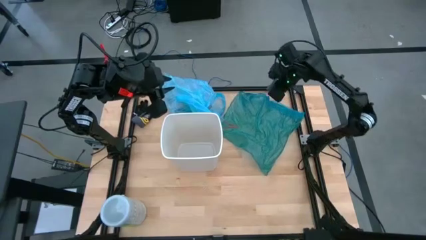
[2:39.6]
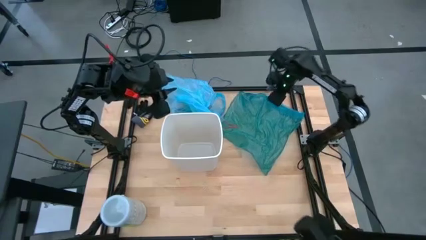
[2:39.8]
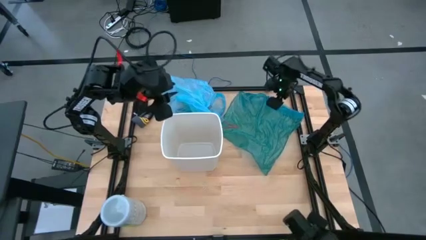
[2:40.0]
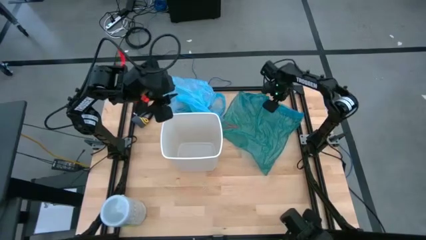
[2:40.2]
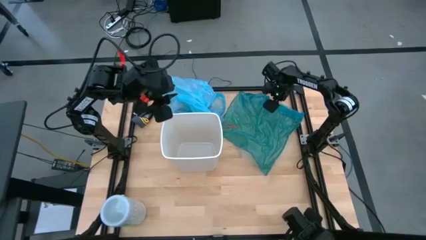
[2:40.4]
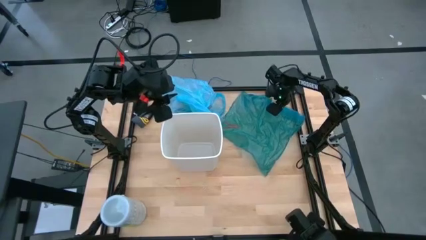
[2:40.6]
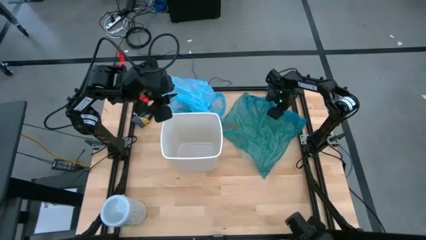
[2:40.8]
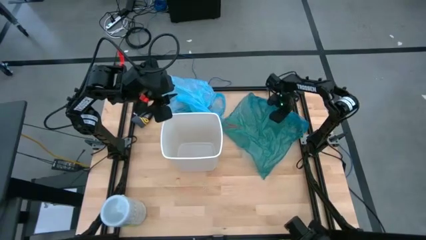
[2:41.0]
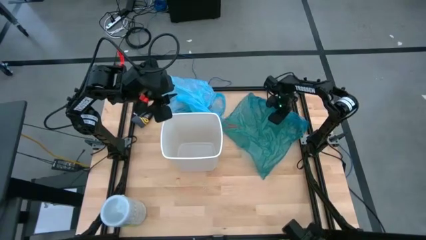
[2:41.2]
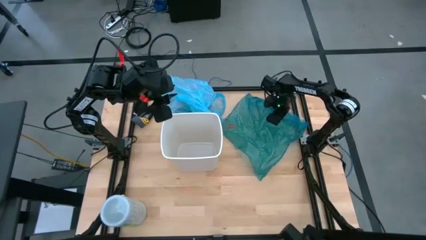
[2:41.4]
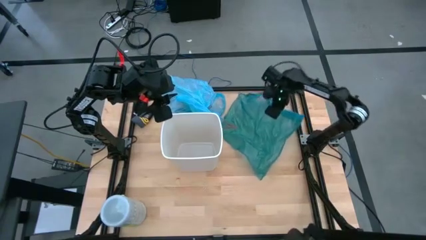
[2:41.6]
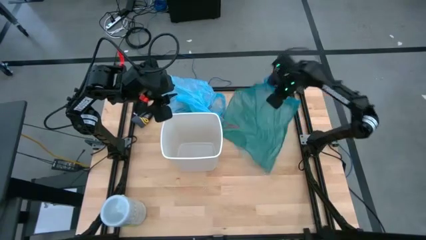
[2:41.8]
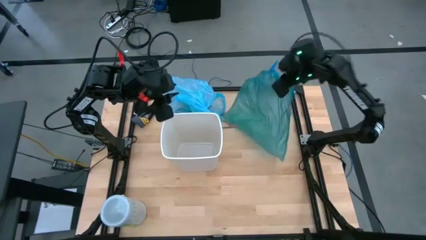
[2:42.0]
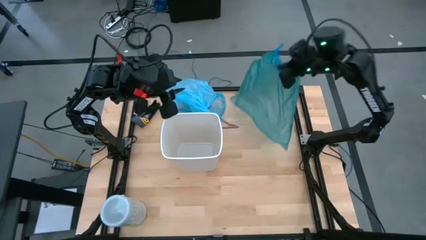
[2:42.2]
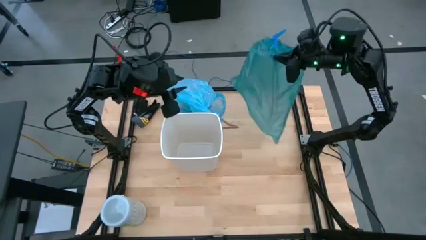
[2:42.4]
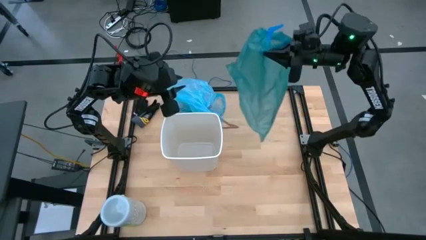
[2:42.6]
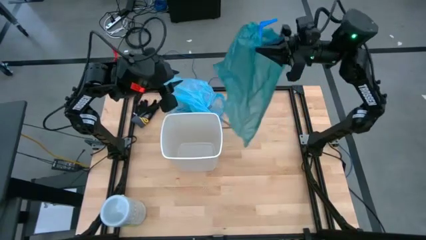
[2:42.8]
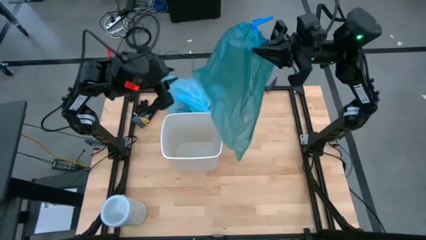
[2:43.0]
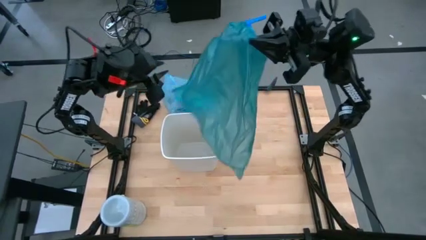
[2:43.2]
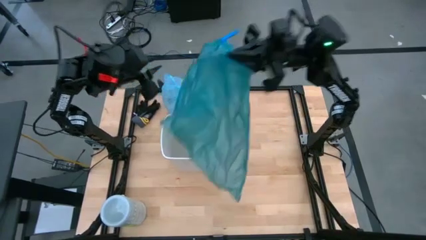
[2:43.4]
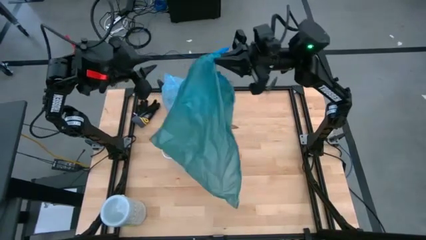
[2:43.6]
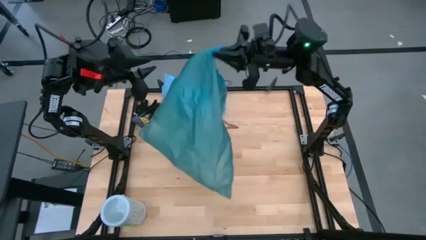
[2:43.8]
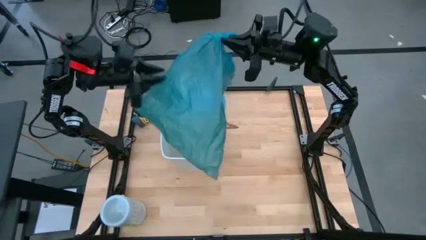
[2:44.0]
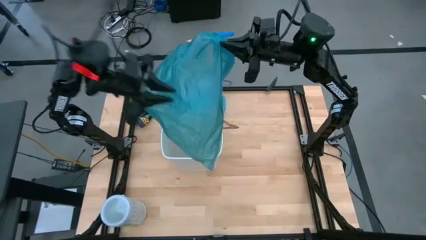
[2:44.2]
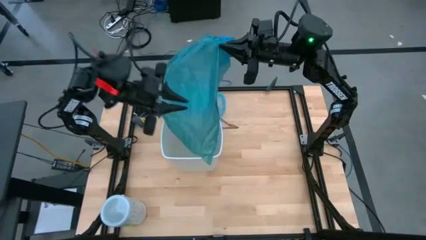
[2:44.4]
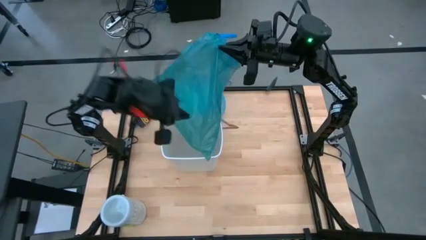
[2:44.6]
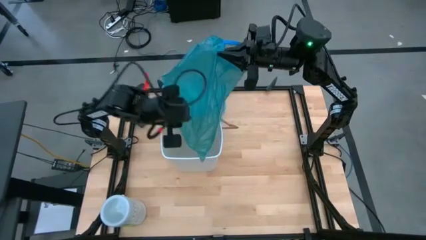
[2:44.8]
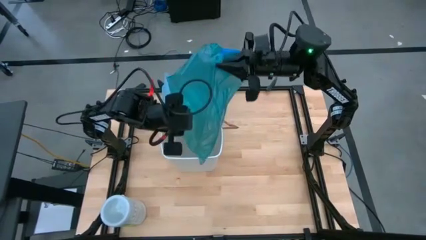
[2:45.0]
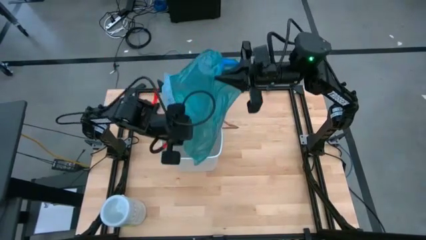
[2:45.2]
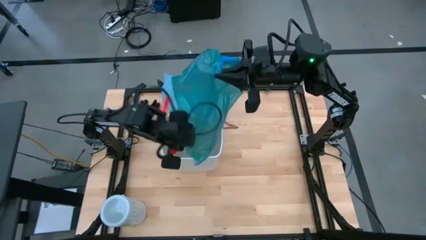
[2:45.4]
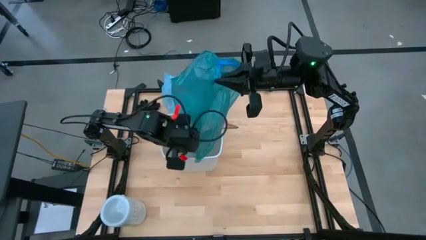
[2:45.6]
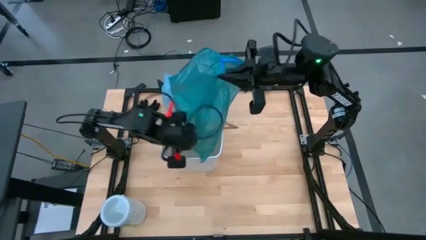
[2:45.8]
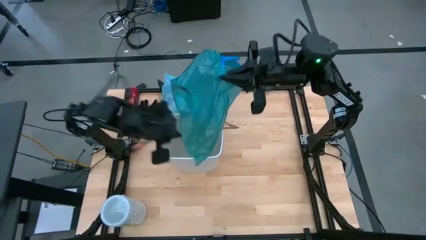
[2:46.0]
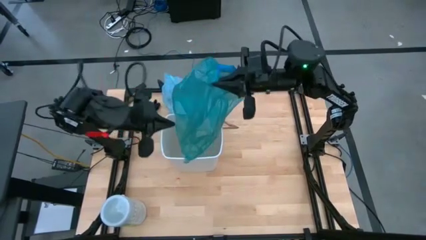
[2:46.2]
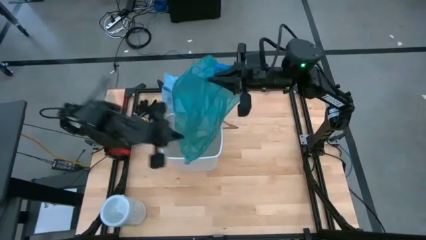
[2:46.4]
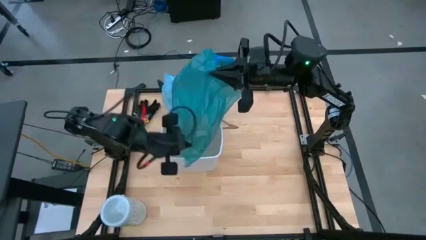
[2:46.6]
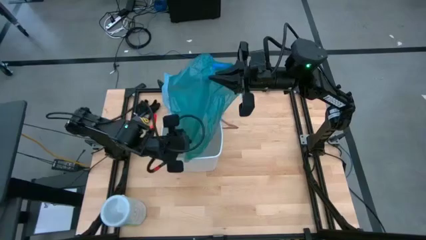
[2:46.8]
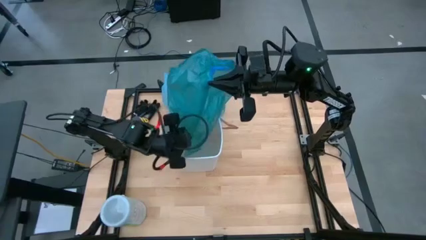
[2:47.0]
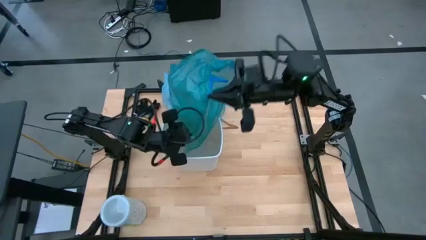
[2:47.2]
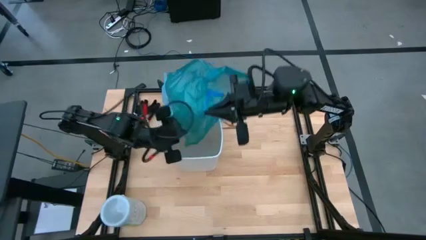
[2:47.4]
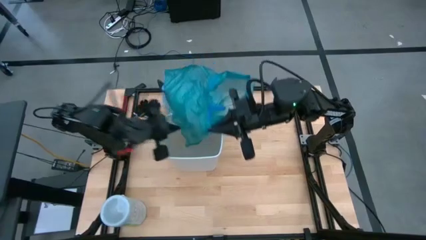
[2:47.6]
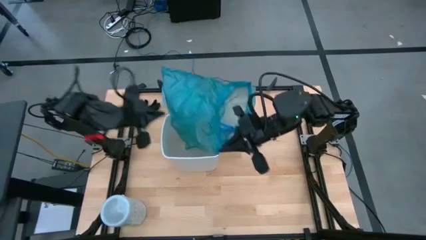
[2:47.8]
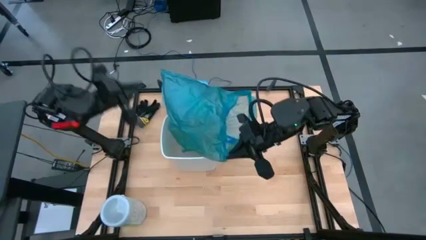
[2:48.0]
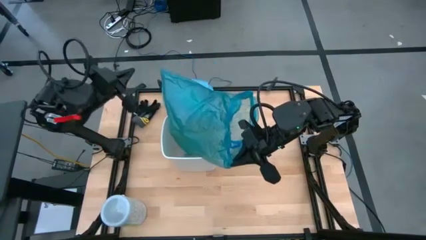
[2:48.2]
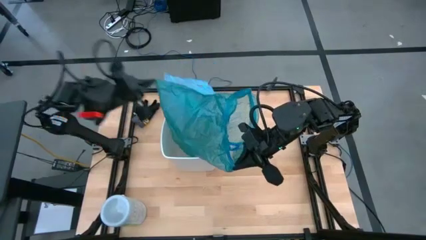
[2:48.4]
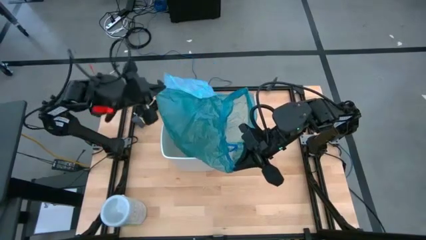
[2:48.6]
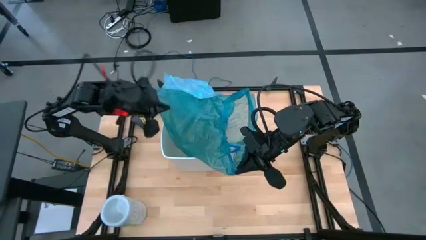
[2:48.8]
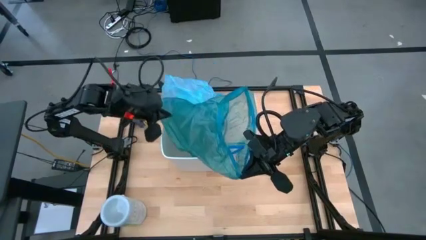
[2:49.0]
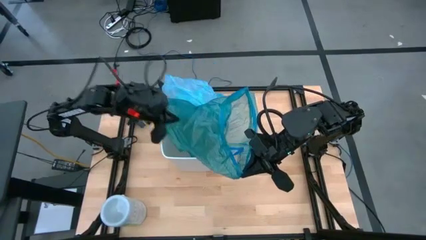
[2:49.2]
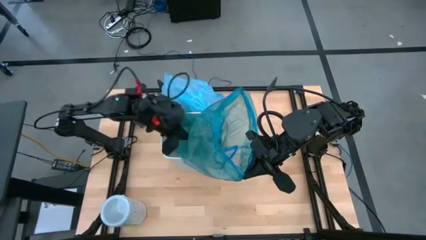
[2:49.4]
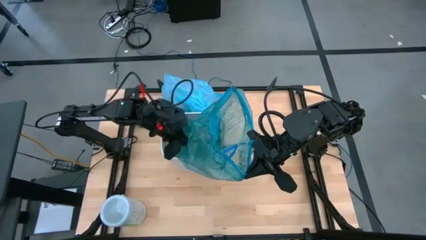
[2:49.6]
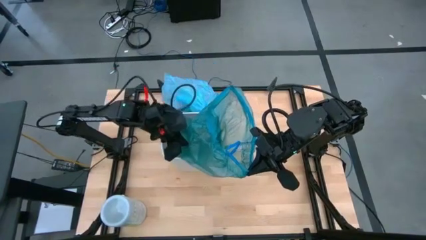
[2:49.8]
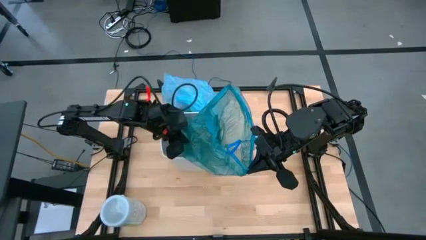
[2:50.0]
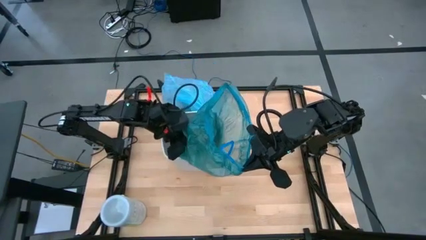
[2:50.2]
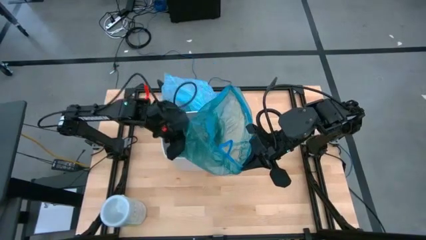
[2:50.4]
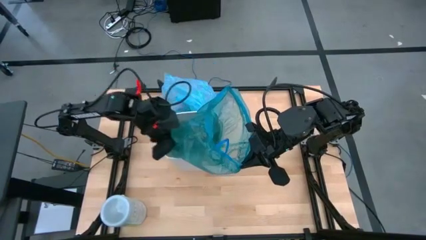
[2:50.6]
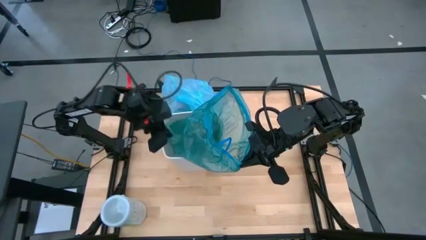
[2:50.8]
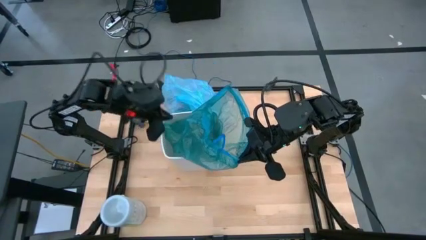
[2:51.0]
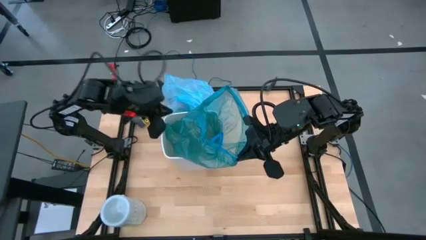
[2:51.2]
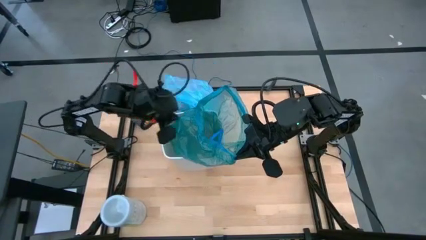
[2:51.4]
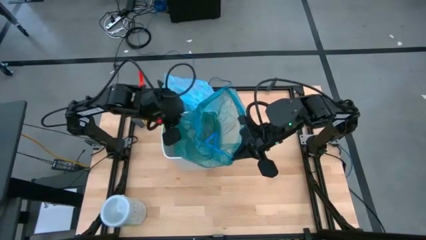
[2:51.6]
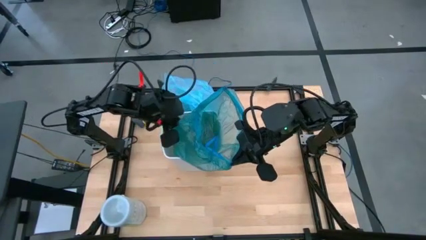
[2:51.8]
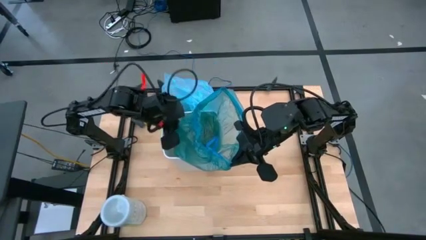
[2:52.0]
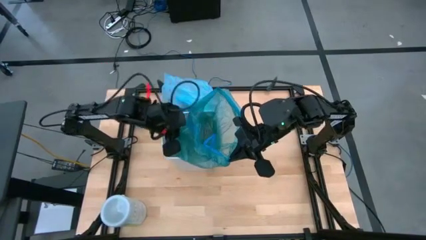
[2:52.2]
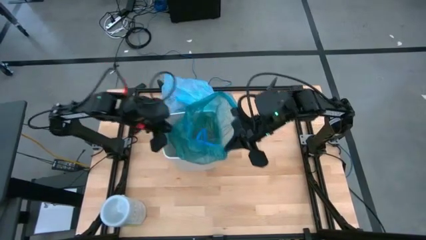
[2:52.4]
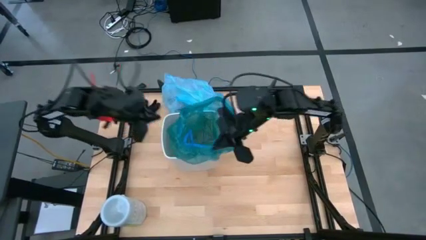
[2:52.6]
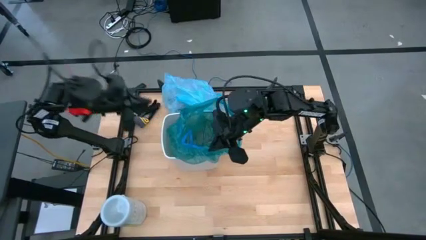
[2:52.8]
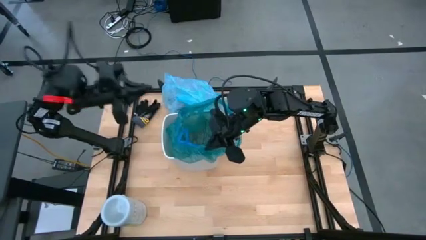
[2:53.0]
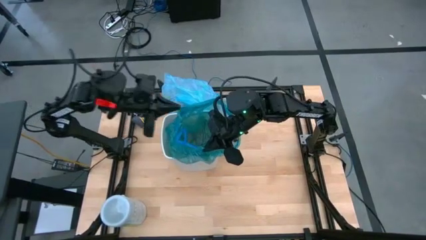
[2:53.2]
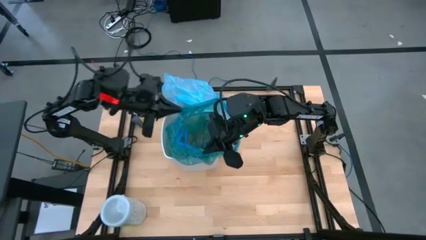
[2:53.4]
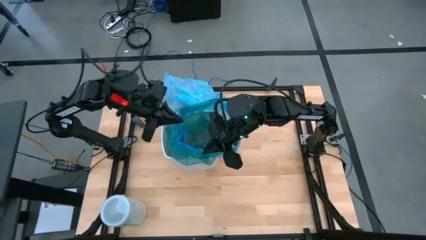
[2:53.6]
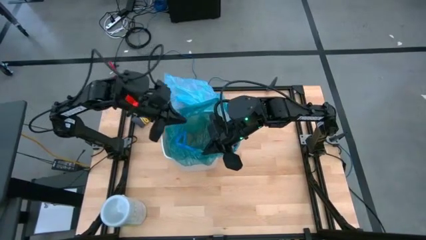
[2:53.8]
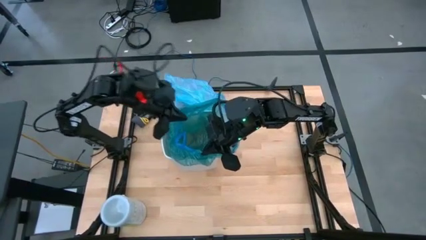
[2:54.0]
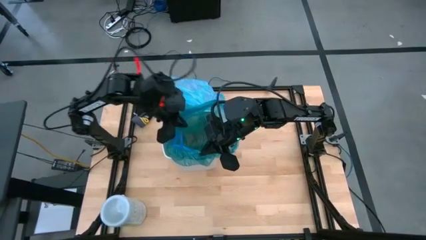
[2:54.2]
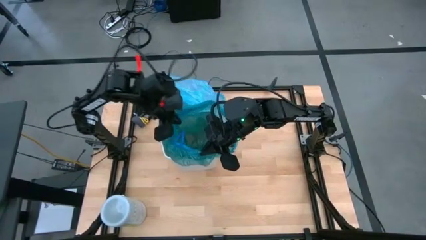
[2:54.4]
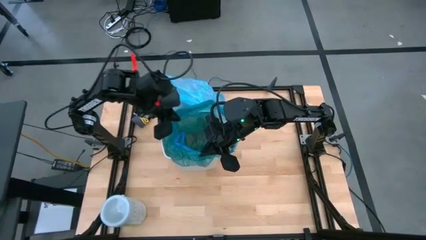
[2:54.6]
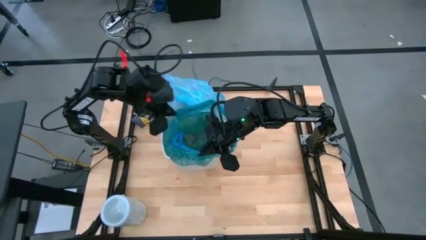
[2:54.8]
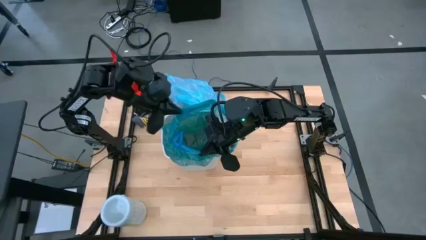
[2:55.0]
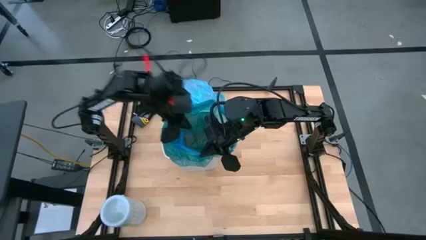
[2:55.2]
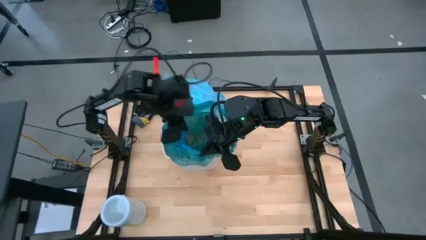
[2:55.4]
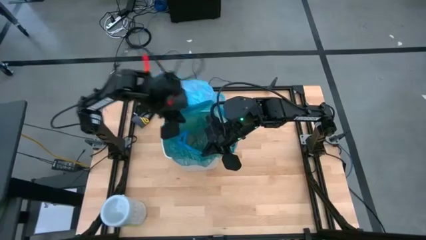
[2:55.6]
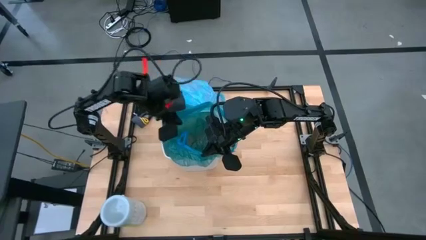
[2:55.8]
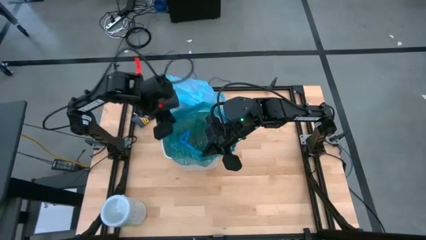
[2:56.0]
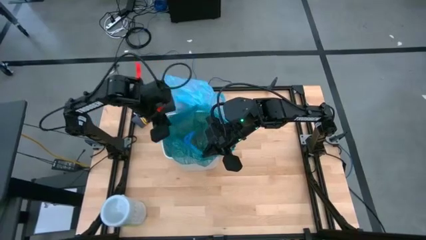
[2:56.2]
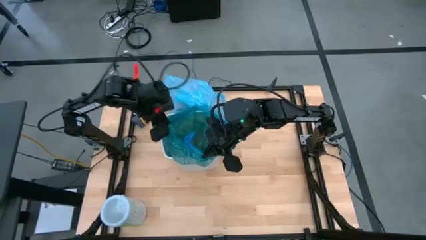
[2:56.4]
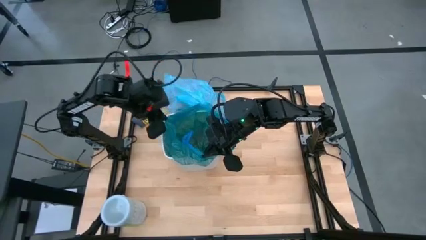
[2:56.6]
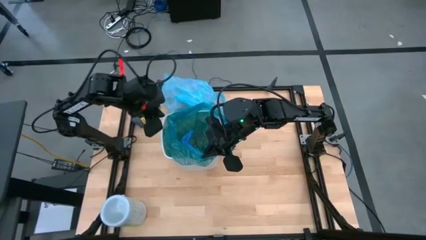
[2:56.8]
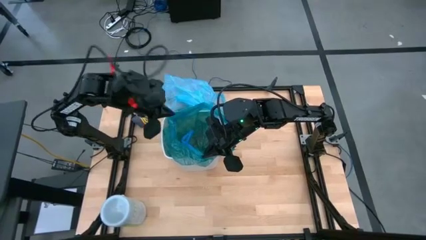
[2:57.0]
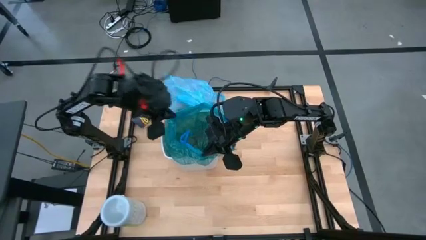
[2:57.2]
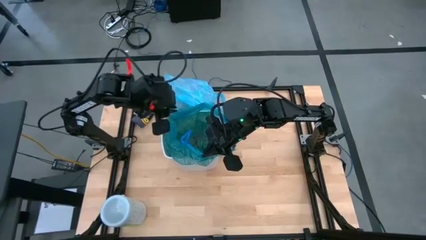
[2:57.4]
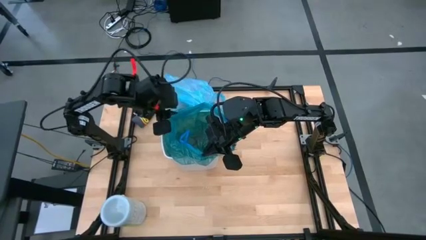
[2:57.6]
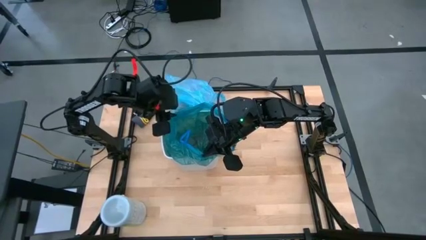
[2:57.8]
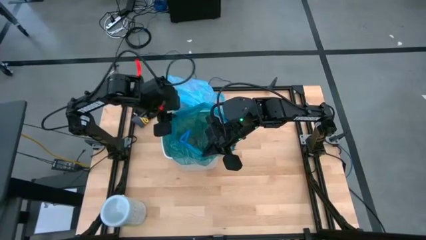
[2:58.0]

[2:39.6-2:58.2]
Task: place trash/remove bag and relplace
Insert the green plastic trash bag into the trash bin
